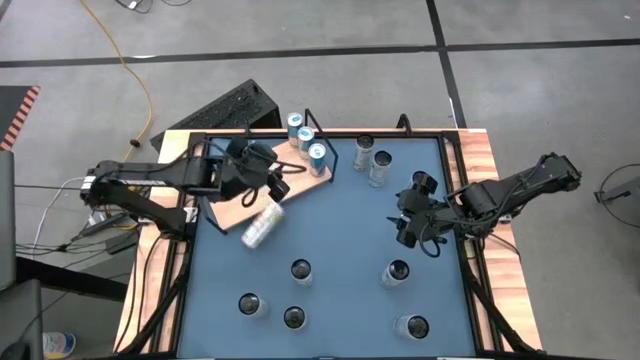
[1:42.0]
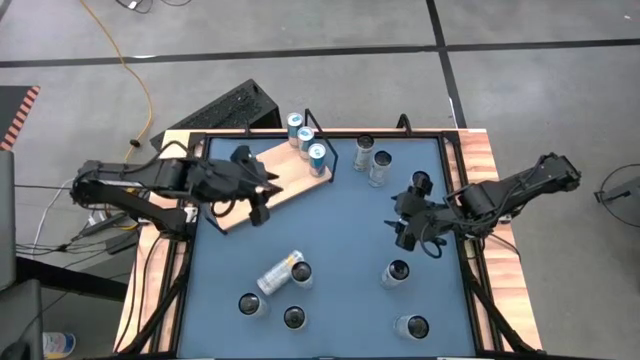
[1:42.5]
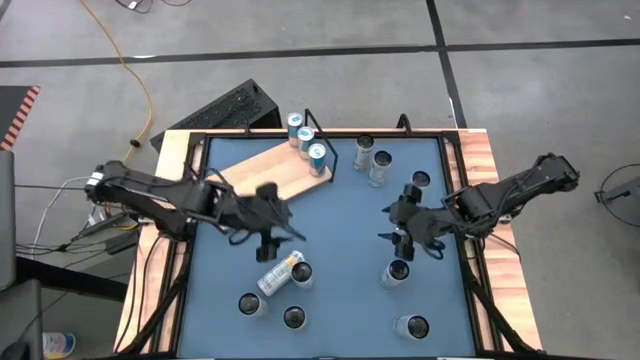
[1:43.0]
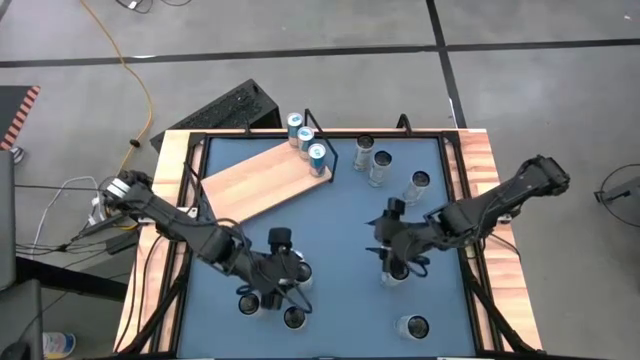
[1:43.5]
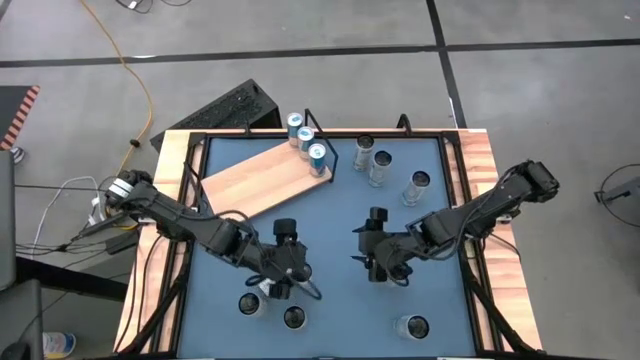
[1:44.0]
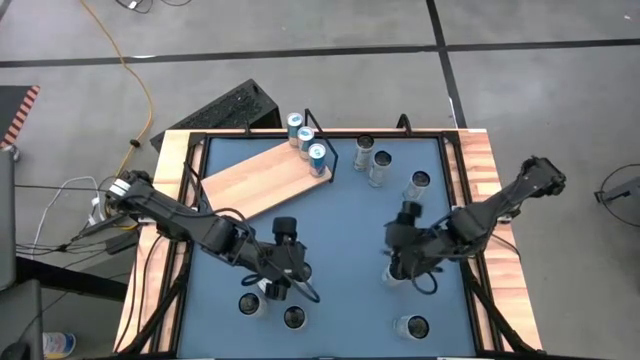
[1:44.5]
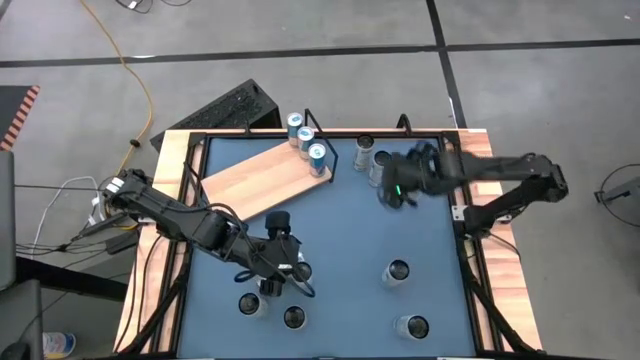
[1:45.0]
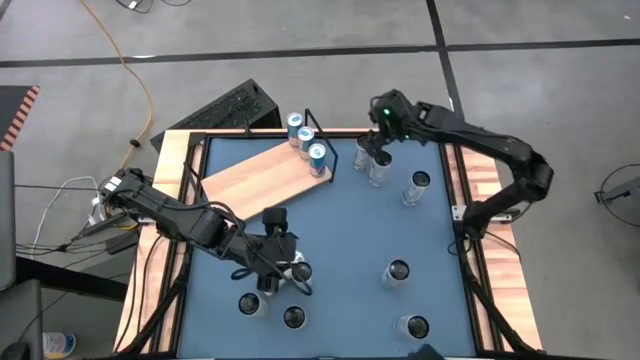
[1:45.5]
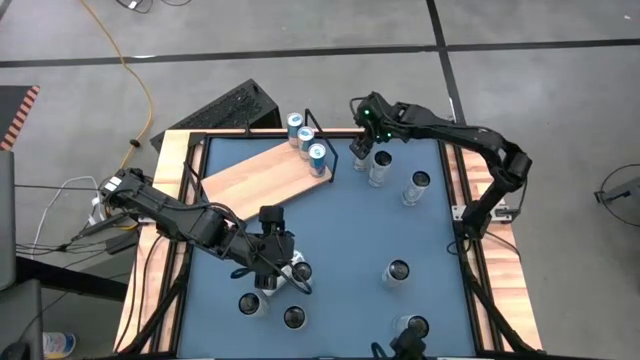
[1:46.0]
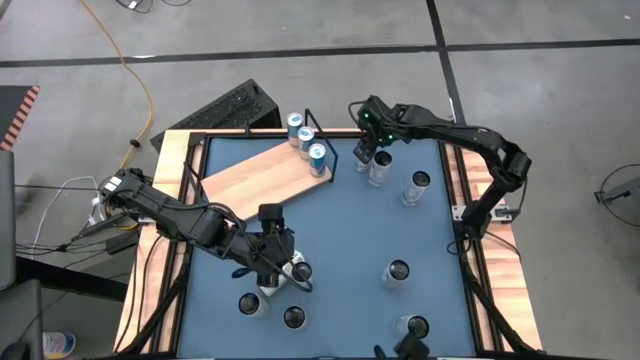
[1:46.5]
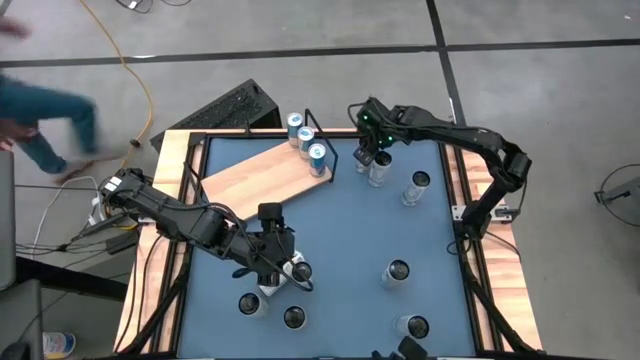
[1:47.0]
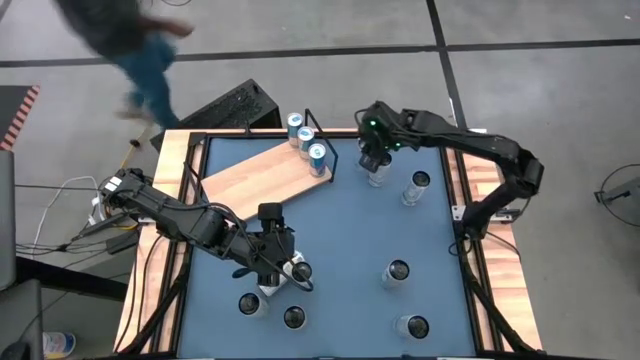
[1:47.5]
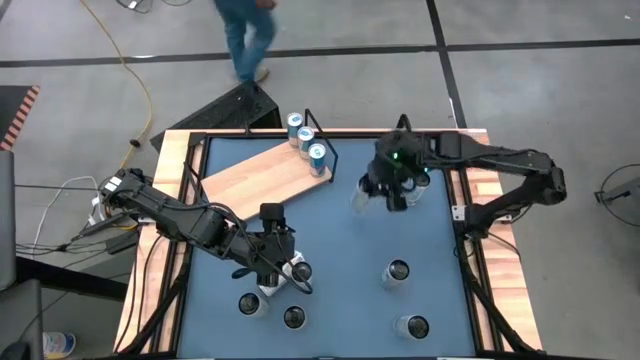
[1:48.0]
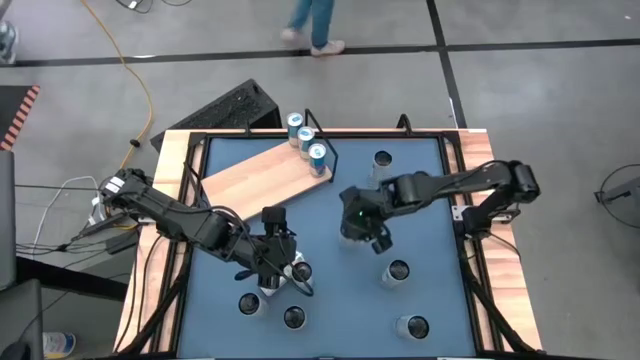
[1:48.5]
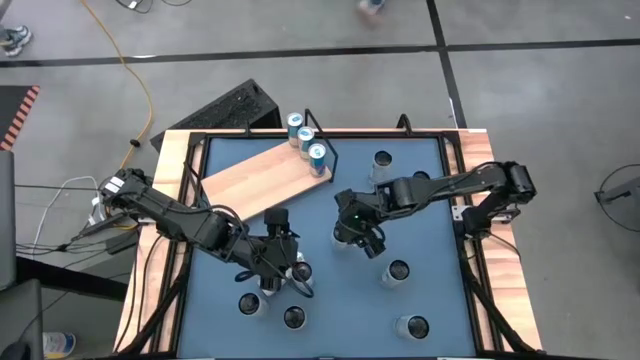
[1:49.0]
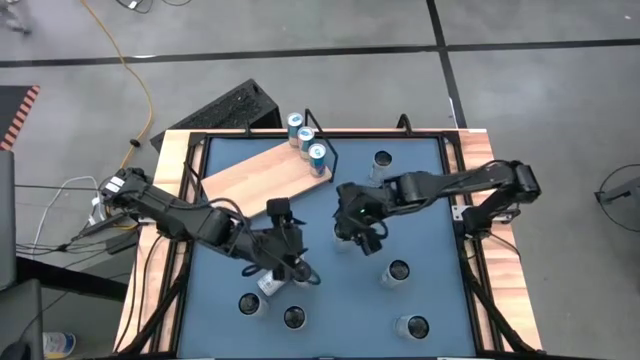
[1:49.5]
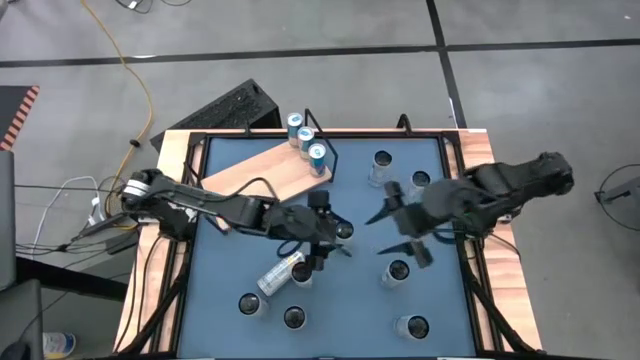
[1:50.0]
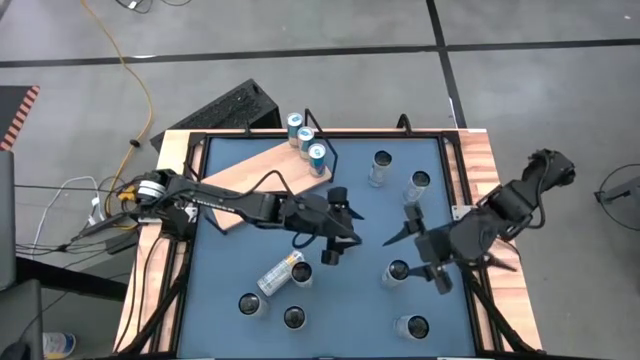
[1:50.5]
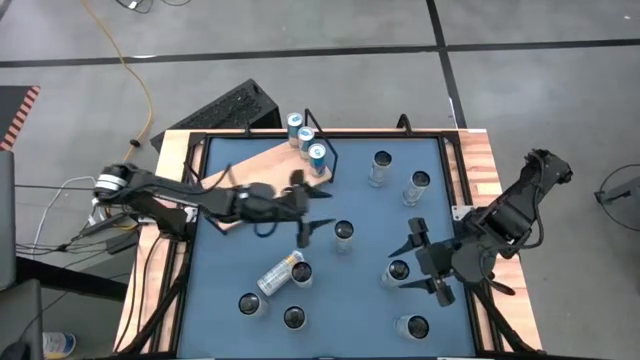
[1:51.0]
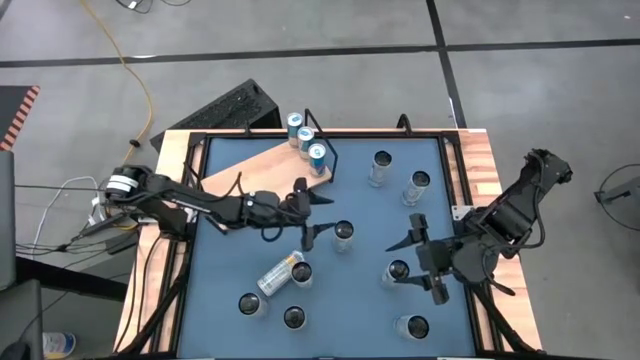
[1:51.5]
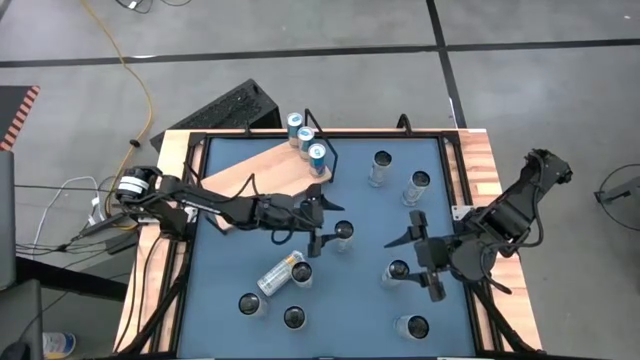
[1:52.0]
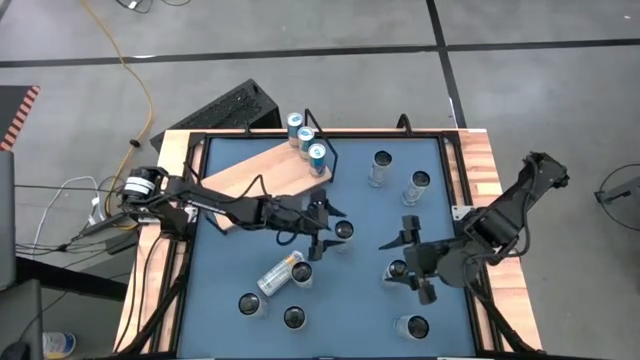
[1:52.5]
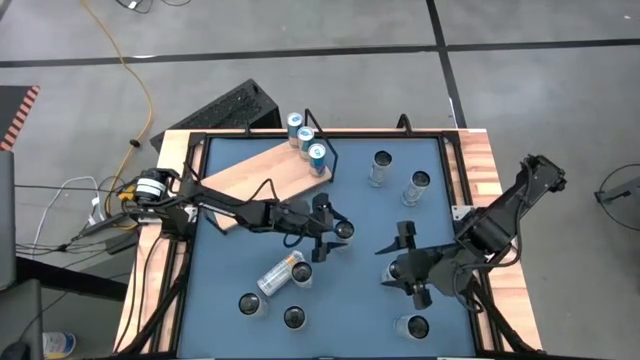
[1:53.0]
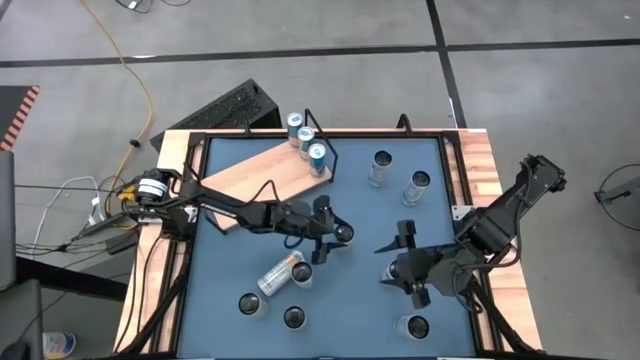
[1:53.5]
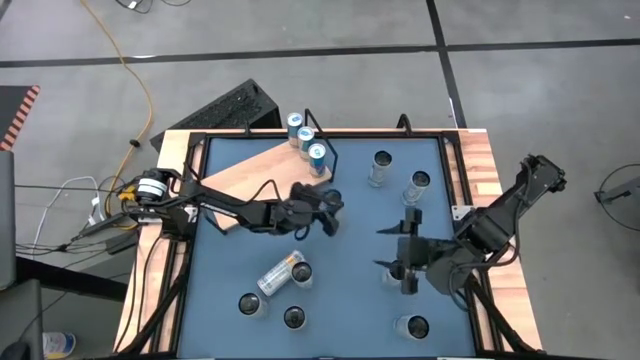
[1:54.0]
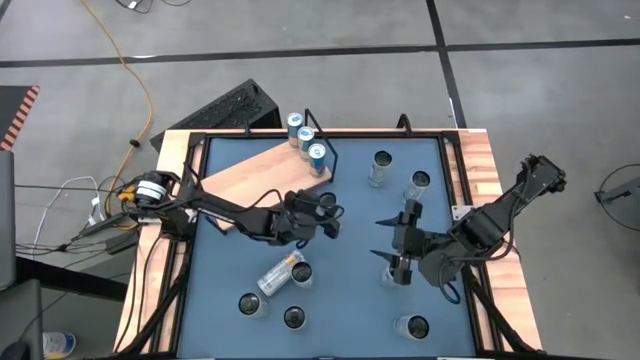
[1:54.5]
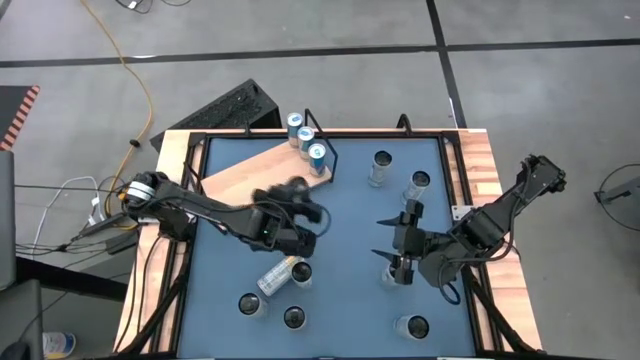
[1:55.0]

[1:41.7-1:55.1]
Task: Place canned beverage on shelf
Put the top right white and yellow soda can on the shelf

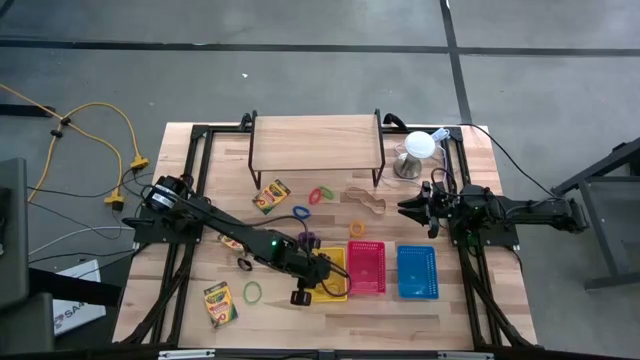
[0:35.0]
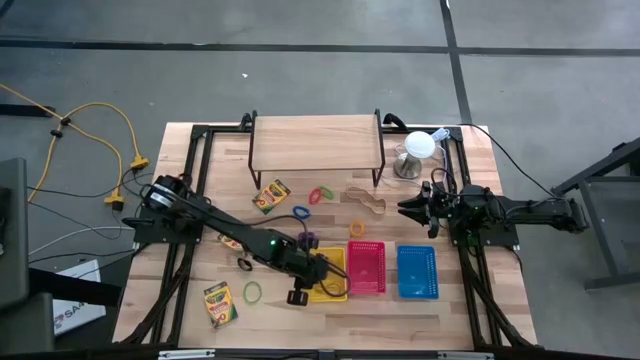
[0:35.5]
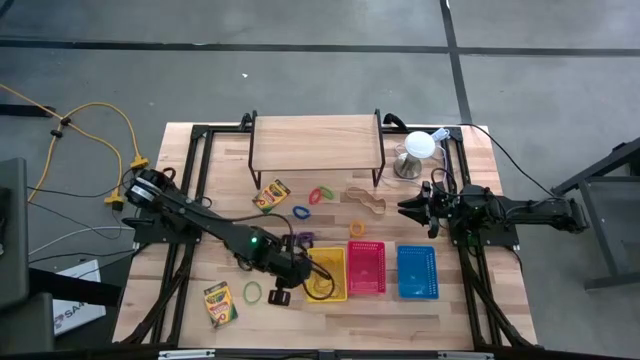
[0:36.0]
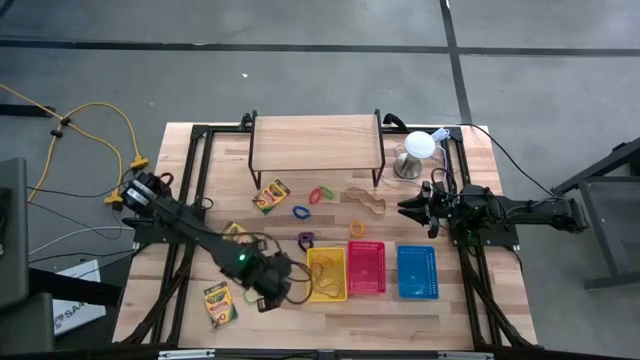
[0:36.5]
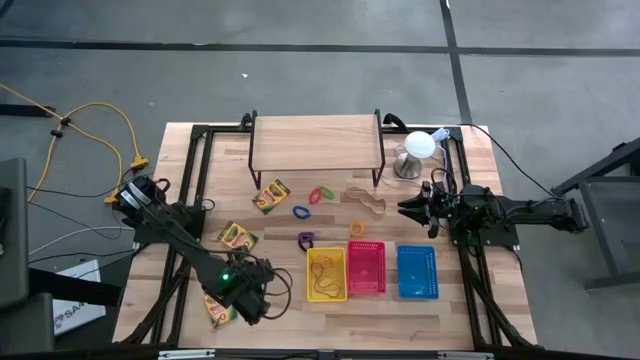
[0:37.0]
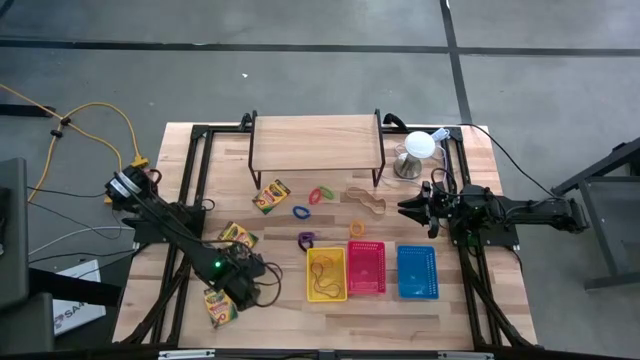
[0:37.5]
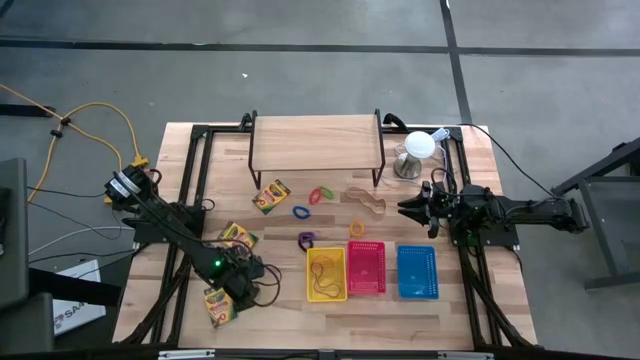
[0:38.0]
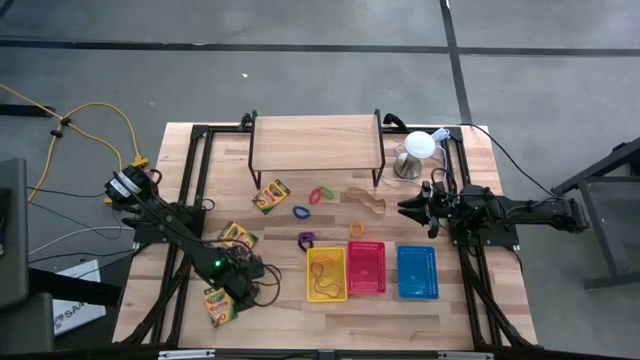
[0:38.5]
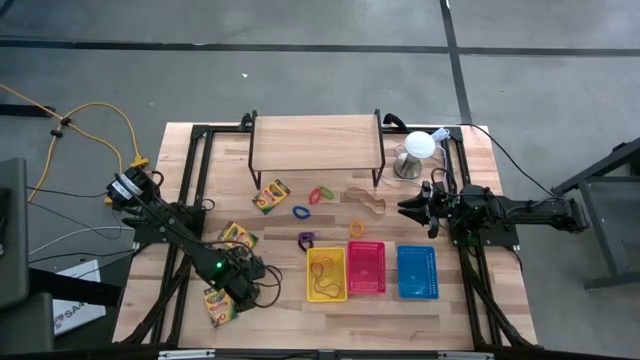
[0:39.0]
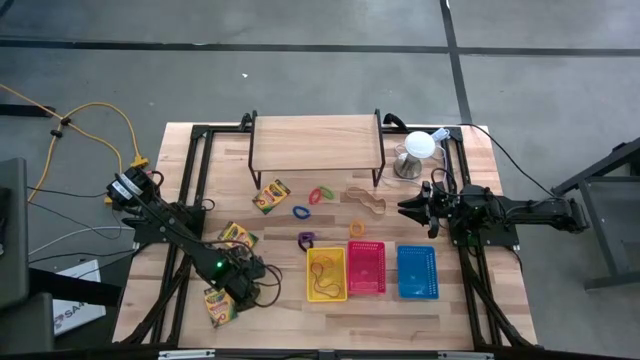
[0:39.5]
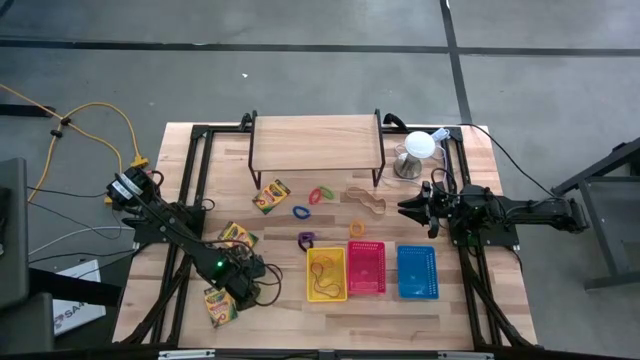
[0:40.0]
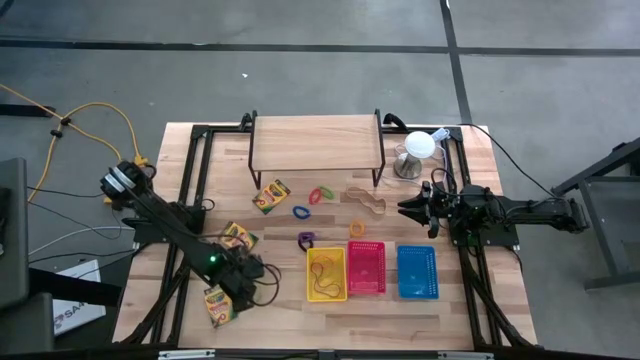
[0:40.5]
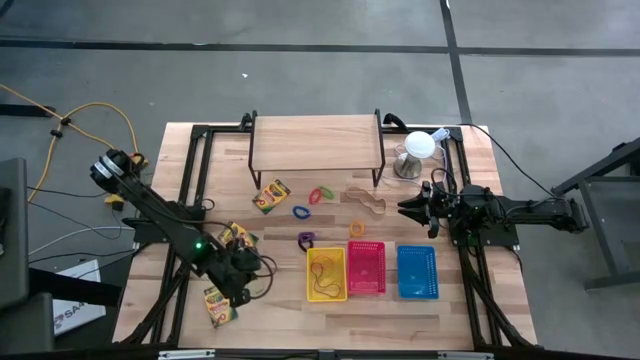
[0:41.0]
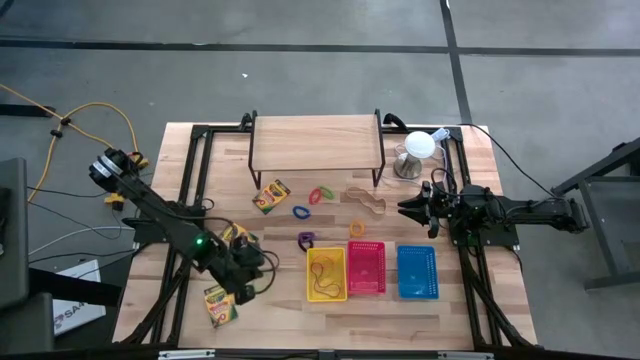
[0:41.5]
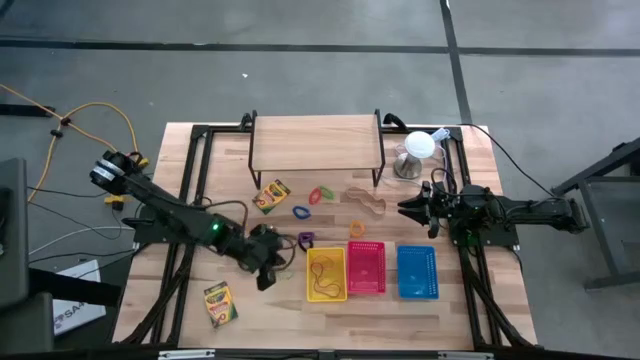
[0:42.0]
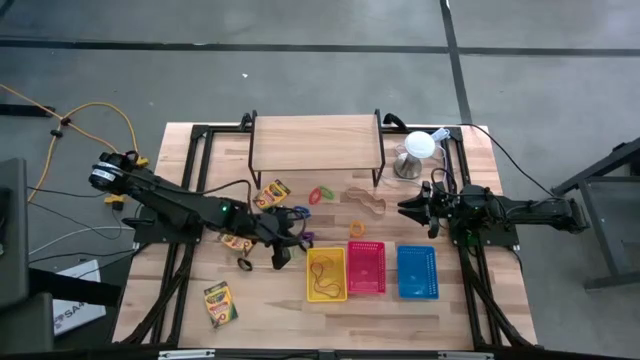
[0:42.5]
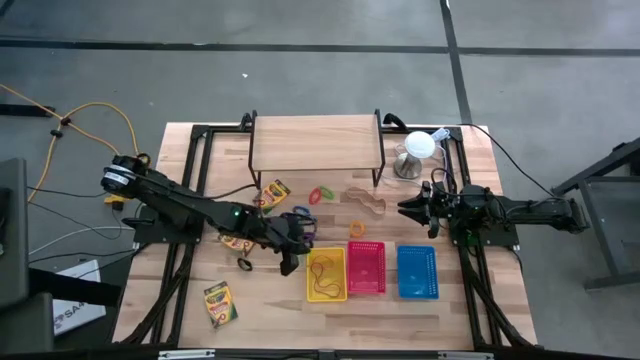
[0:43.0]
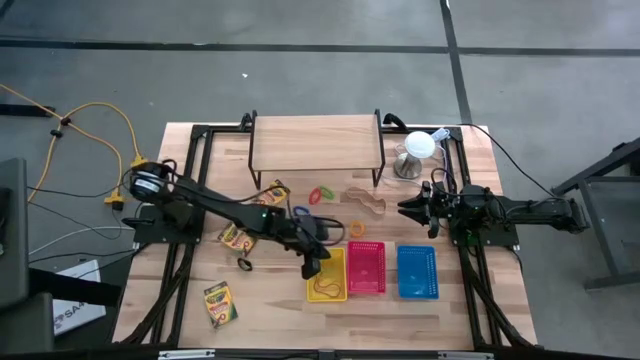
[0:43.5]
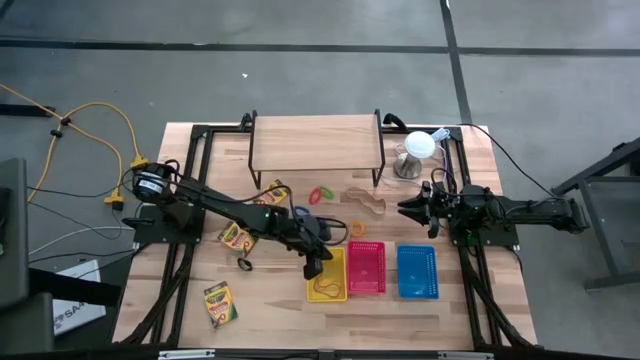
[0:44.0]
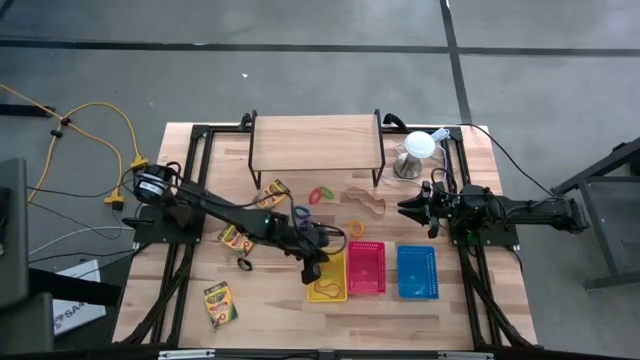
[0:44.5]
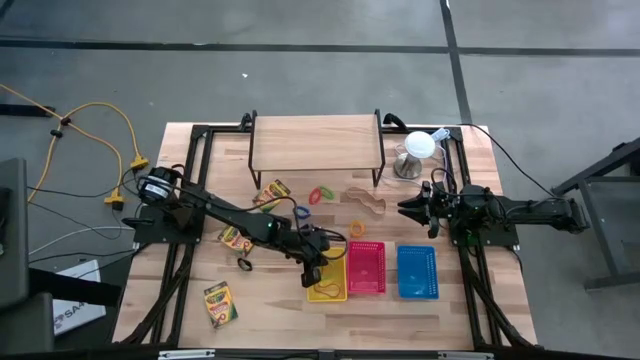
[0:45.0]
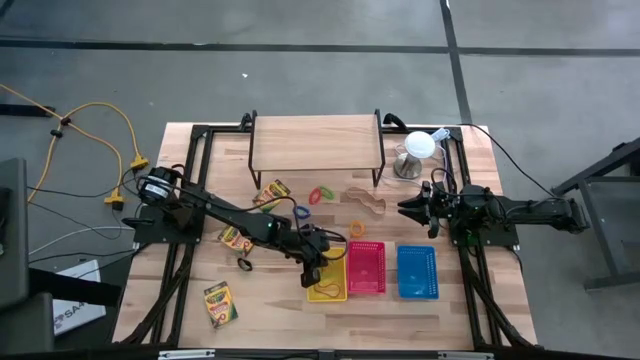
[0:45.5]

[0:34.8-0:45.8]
Task: Pick & Place Office Desk Supplies
Put the green rubber band into the yellow bin
